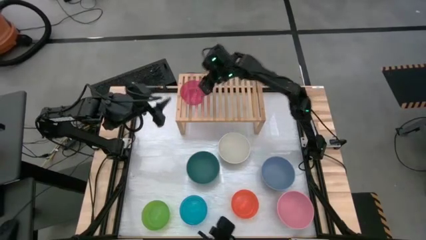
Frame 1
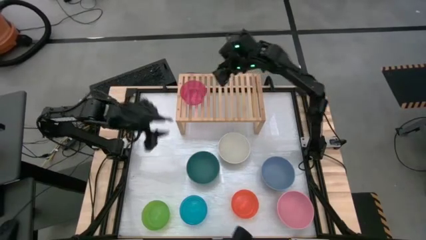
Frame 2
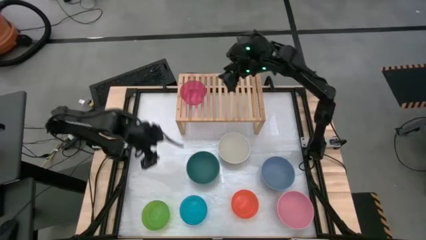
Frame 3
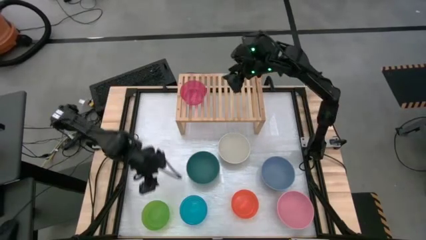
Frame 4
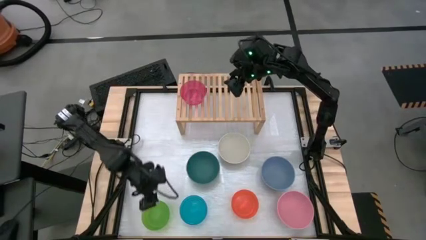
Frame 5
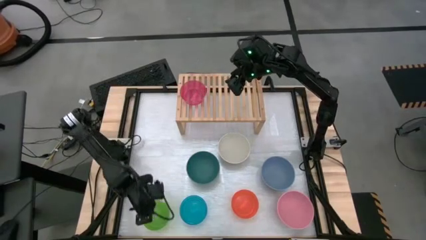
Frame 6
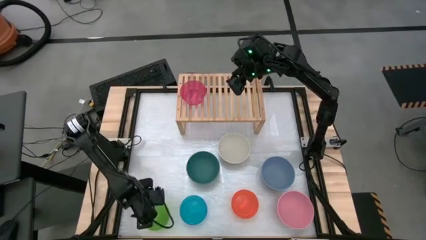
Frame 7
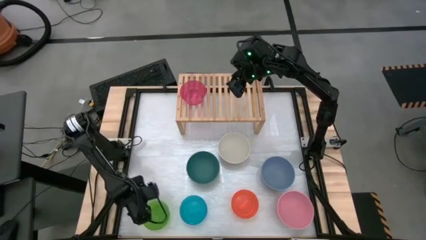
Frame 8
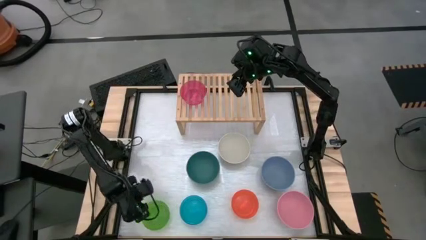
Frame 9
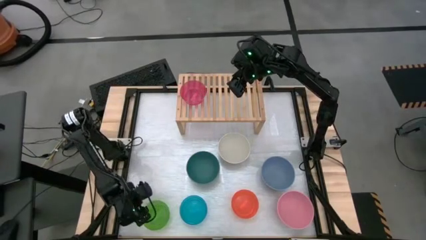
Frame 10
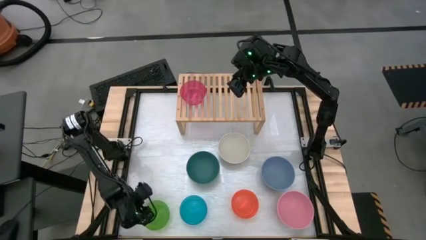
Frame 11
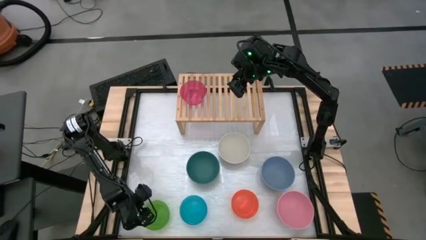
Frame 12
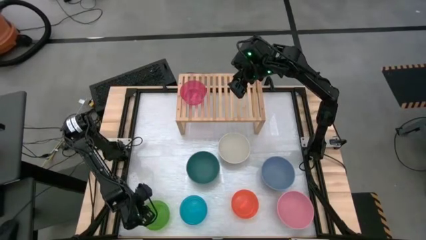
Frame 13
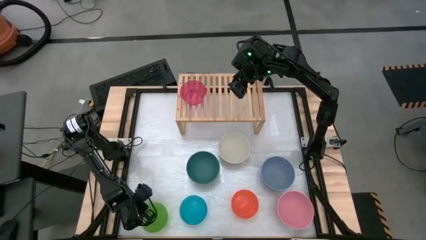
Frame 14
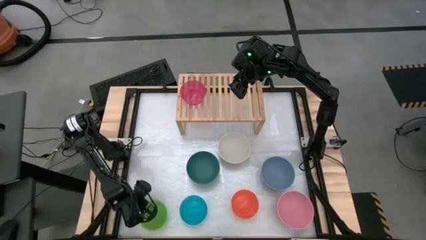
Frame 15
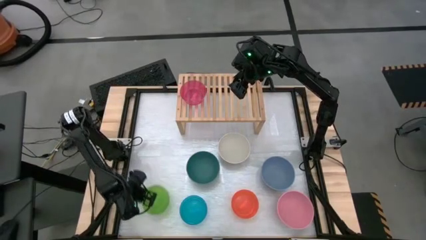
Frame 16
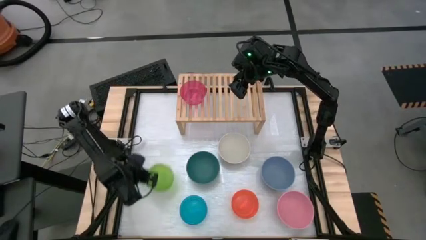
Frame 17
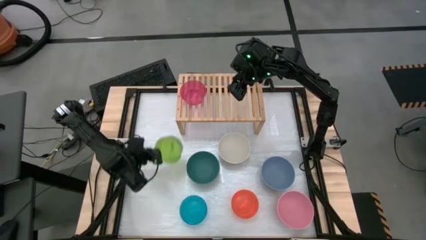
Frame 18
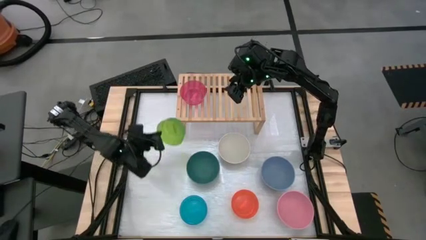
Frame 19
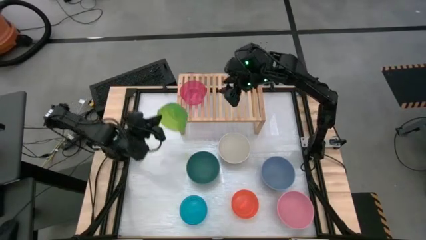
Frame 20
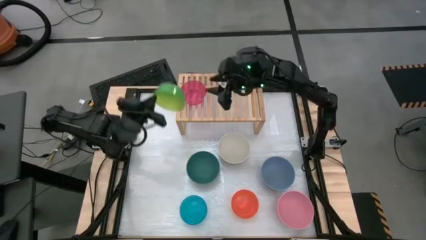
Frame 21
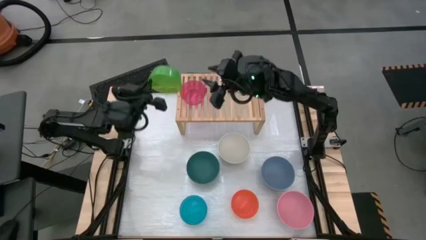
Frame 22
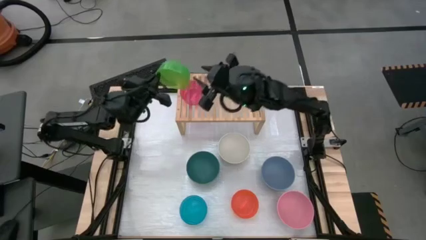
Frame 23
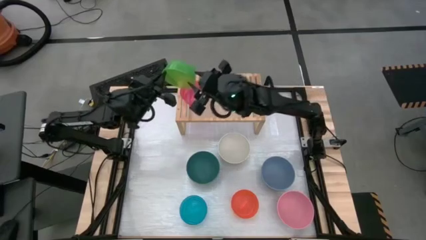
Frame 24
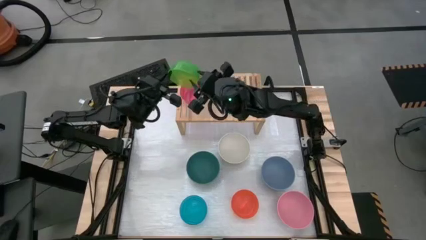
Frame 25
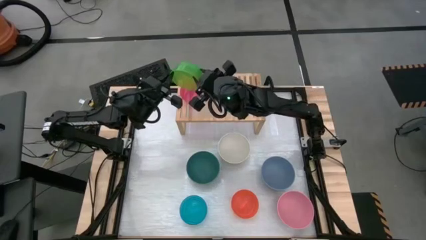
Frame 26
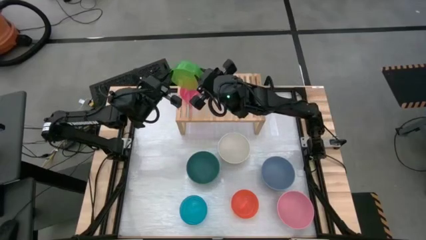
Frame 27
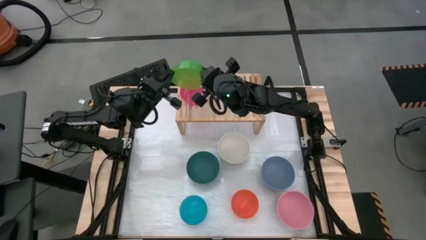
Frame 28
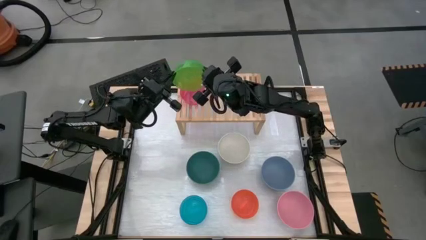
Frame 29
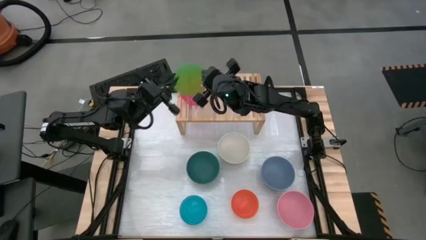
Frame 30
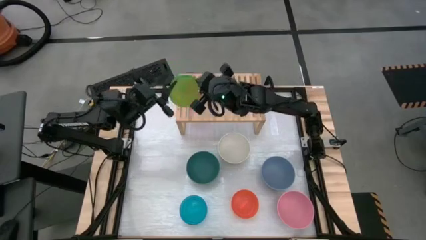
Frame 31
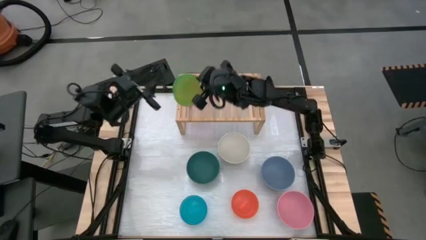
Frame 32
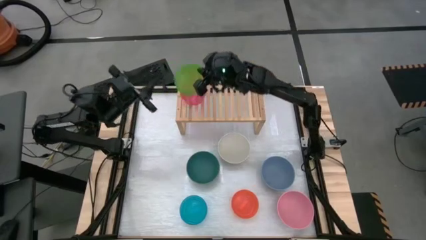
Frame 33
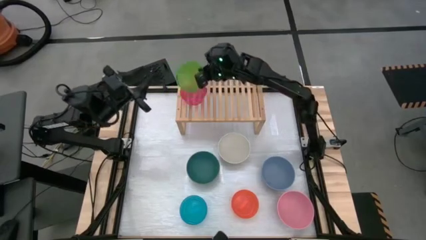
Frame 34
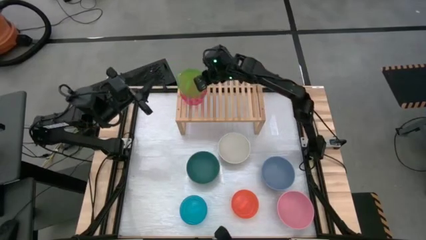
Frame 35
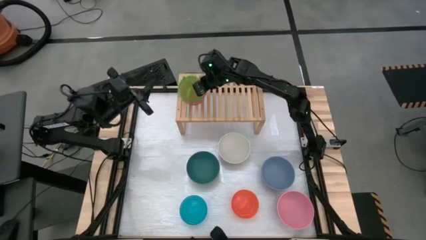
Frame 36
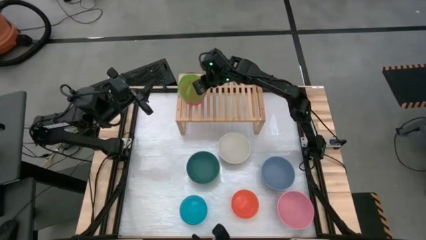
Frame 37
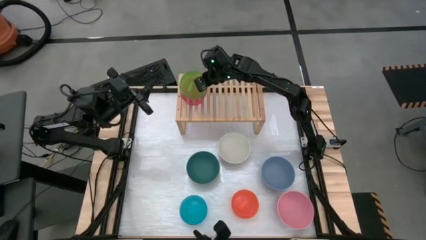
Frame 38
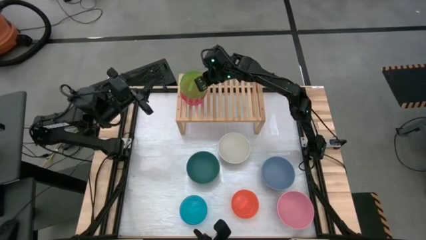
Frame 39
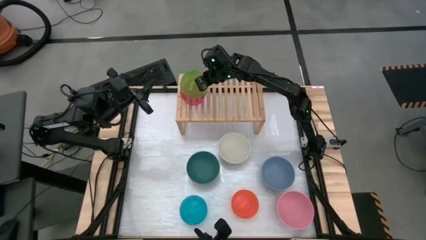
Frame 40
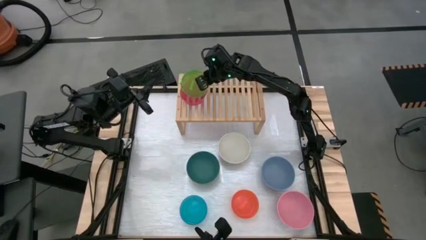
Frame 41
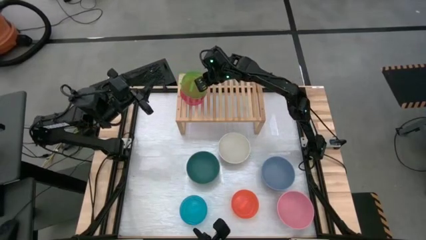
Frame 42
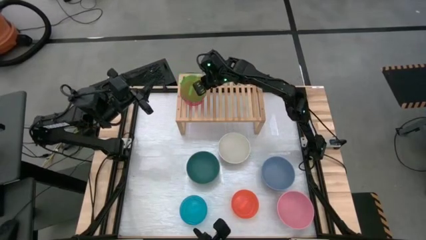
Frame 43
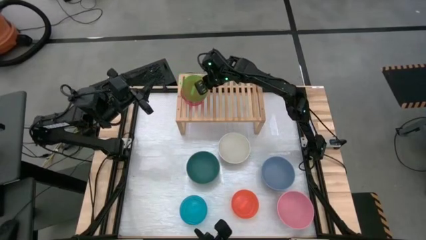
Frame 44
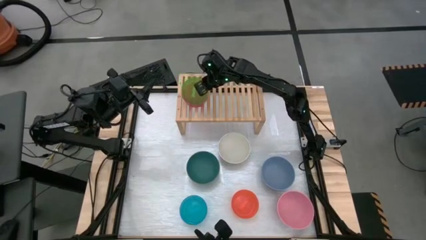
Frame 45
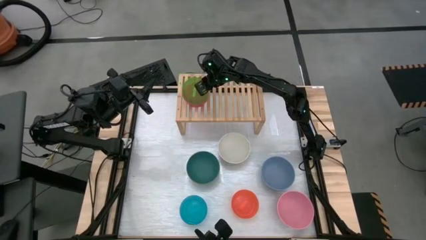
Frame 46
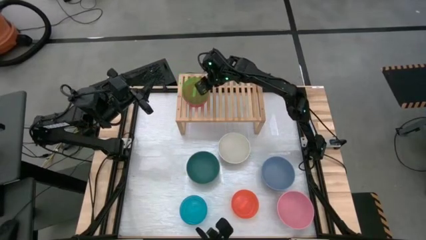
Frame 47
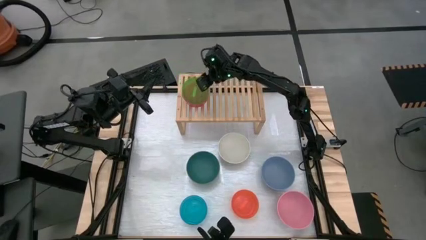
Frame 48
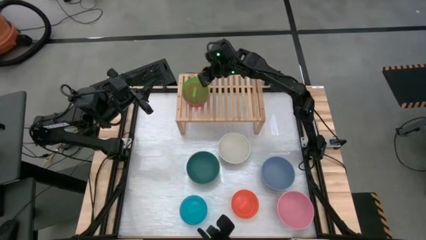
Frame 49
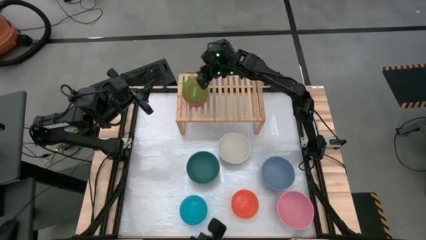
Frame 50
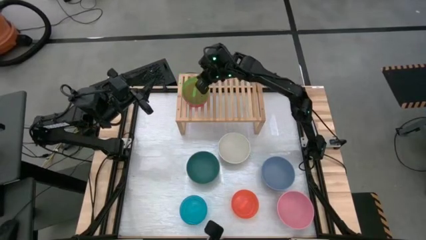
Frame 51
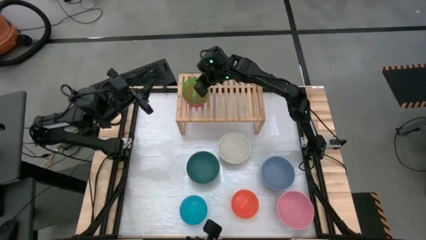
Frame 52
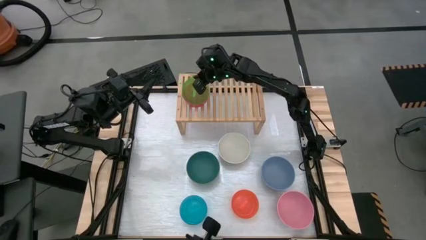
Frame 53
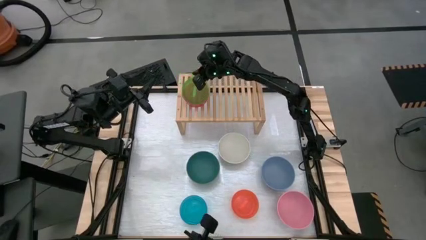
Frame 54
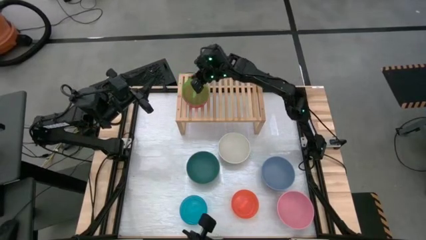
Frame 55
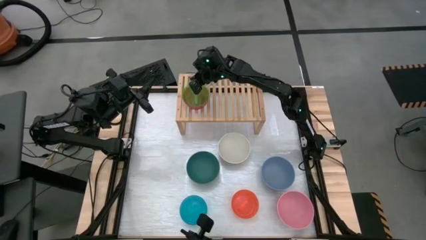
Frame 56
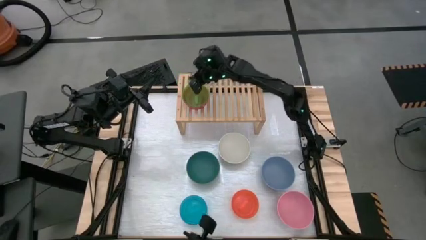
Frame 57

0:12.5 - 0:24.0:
Task: Place and stack bowls onto a shelf
Stack the transparent green bowl on top of the transparent pink bowl on the shelf

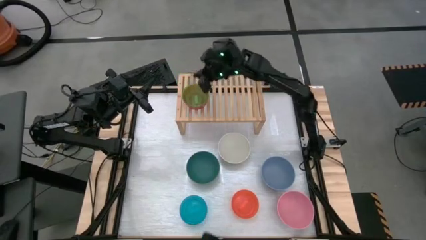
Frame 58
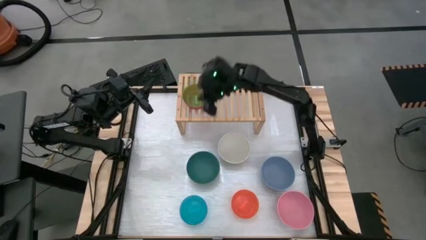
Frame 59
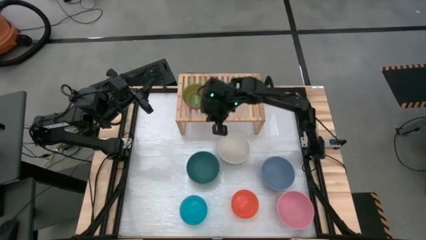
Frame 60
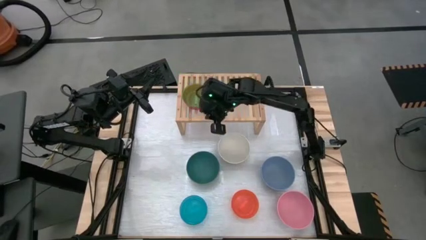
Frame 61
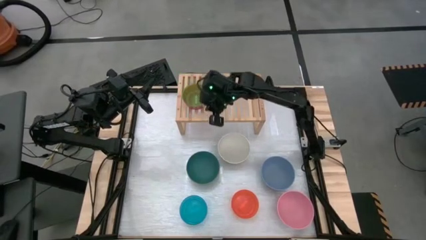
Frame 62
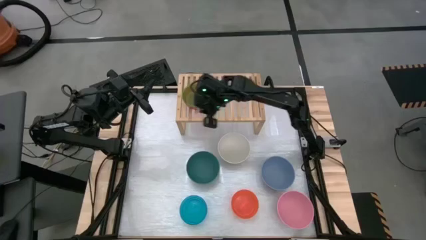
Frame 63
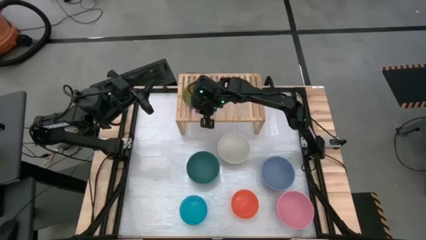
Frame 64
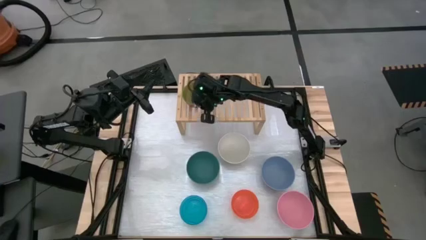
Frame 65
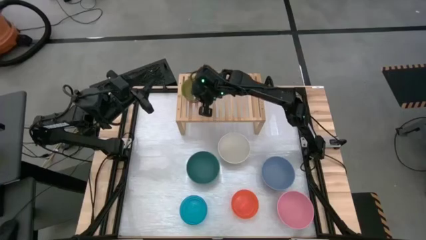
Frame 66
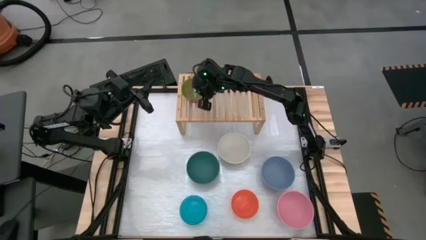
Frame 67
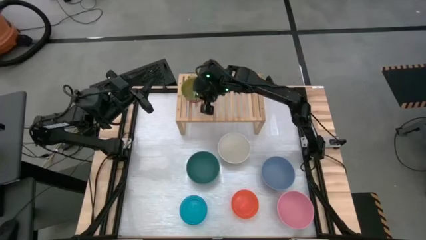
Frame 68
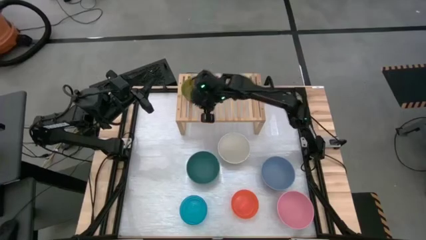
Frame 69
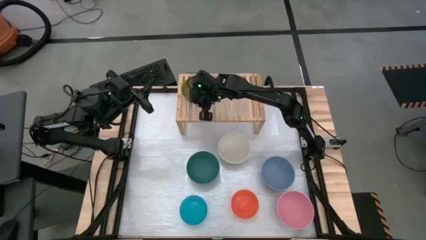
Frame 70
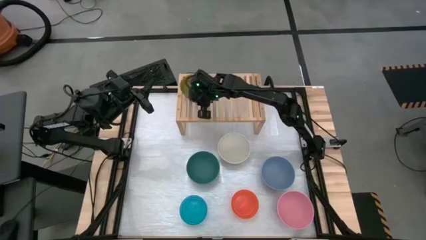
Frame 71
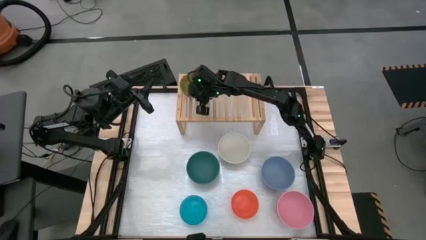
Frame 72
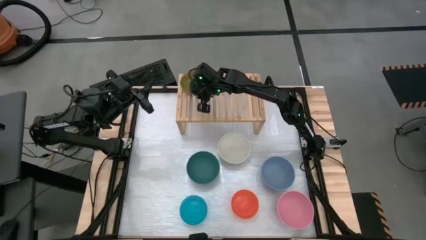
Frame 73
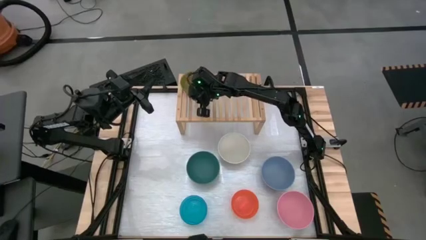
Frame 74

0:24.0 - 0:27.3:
Adjust the stacked transparent bowls on the shelf

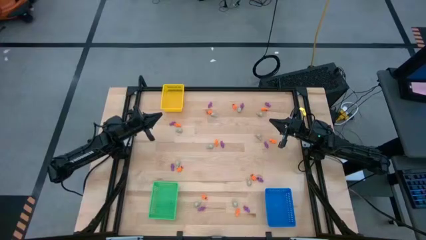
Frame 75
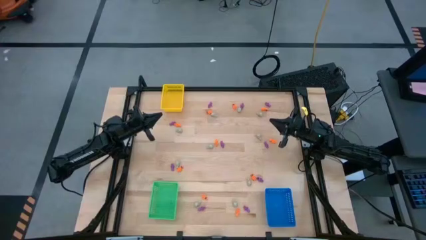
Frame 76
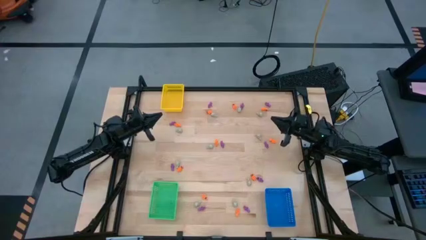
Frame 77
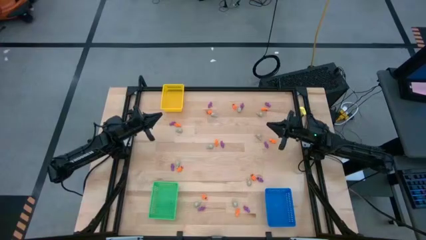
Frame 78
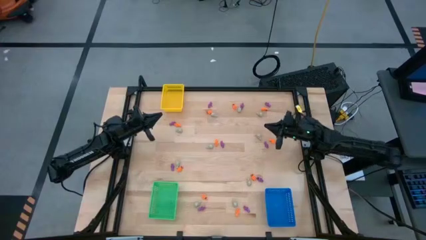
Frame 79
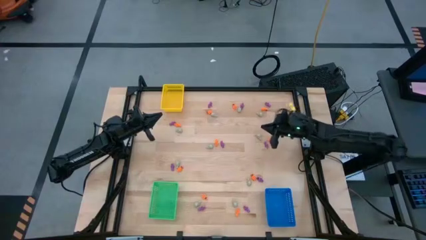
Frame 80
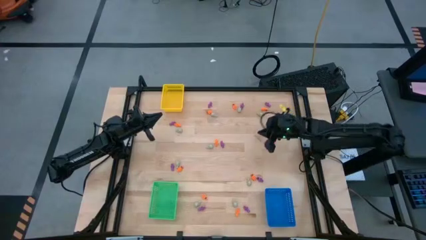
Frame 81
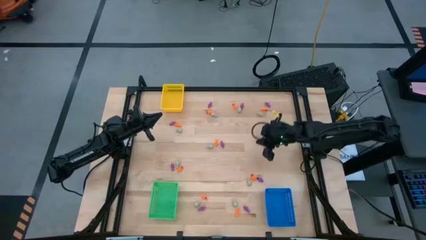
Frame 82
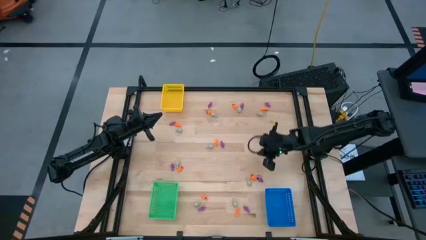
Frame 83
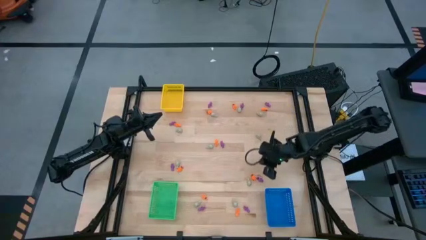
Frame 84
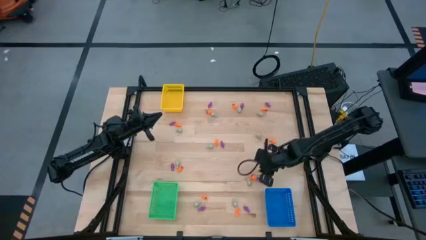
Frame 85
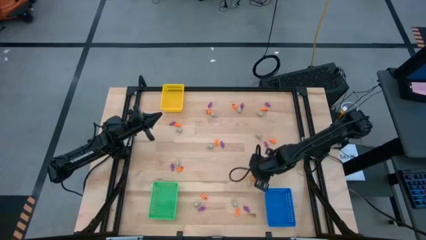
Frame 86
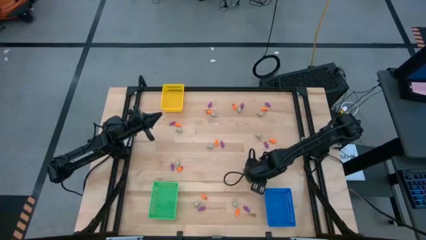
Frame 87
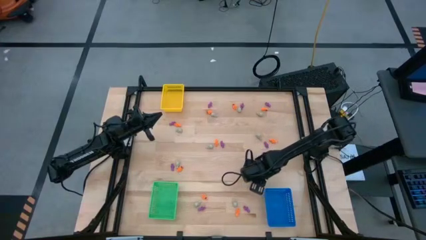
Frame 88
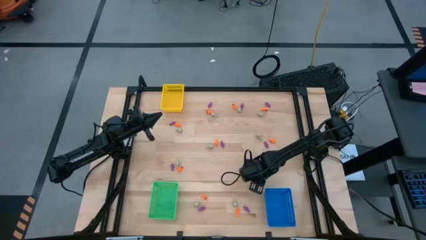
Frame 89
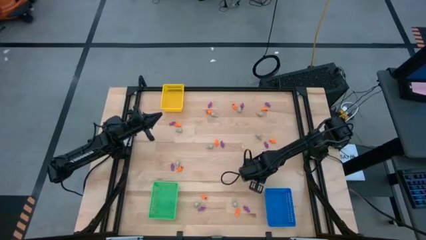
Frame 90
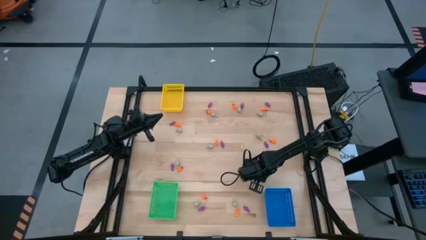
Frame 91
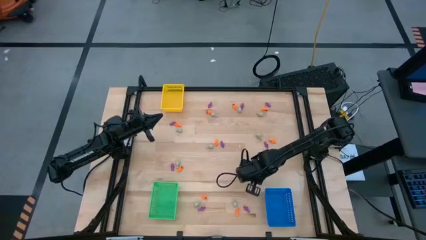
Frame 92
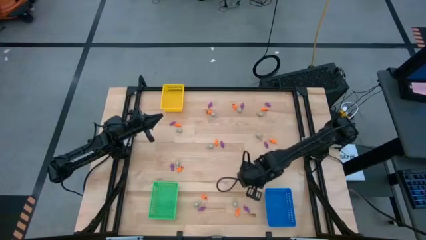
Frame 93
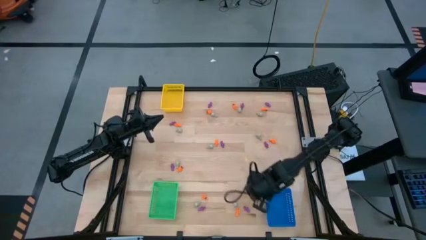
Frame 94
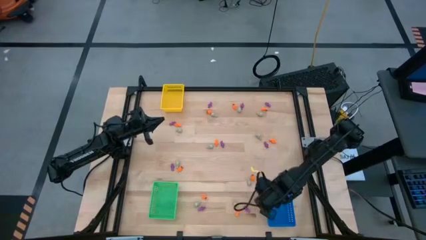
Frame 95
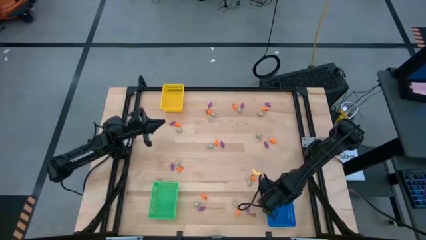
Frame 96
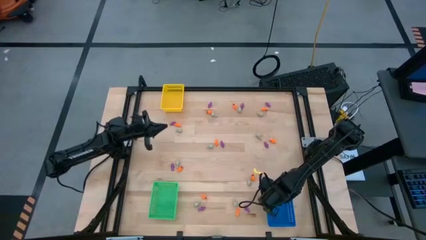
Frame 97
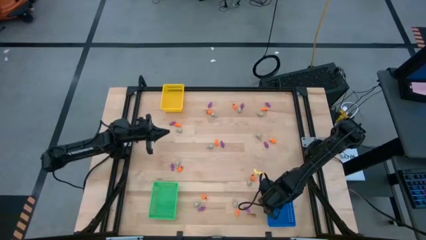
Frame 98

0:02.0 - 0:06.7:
Task: Sort Halloween decoration
Put the purple skeleton toy into the blue bin
